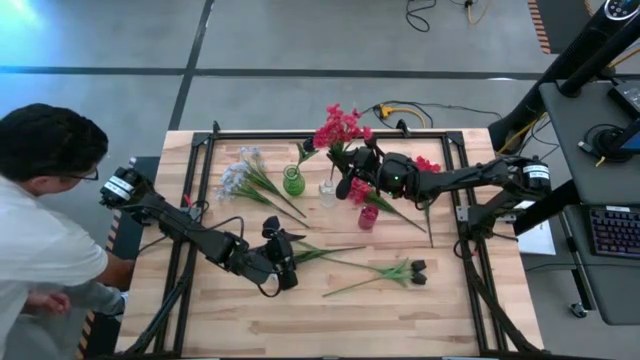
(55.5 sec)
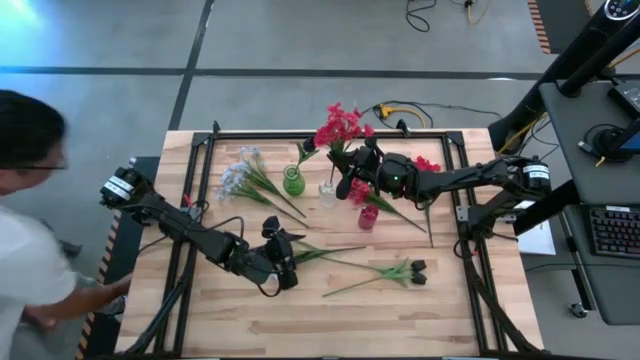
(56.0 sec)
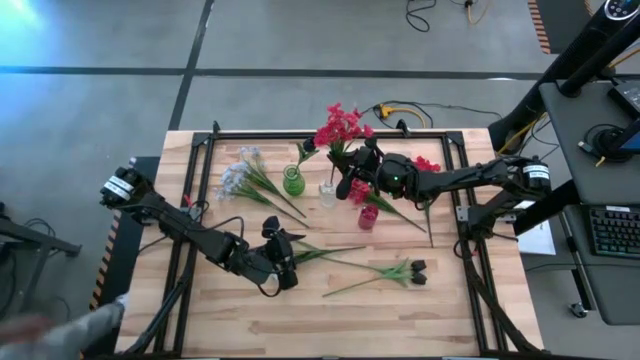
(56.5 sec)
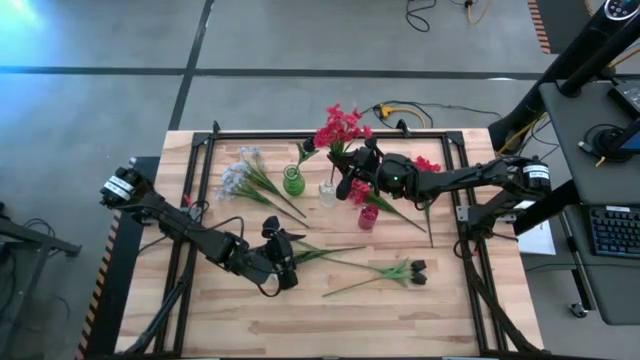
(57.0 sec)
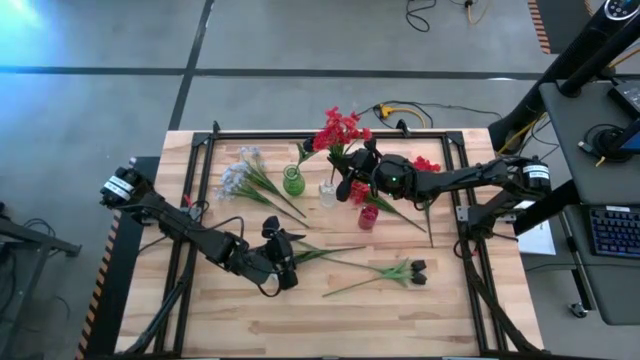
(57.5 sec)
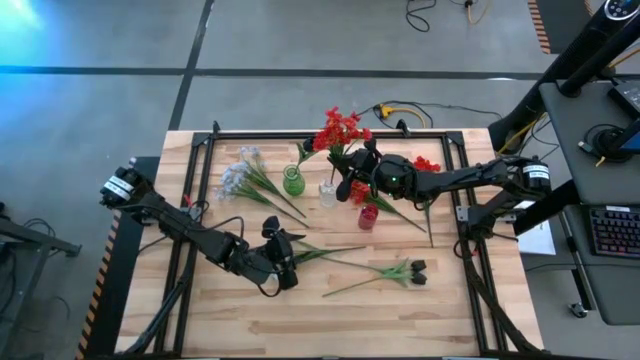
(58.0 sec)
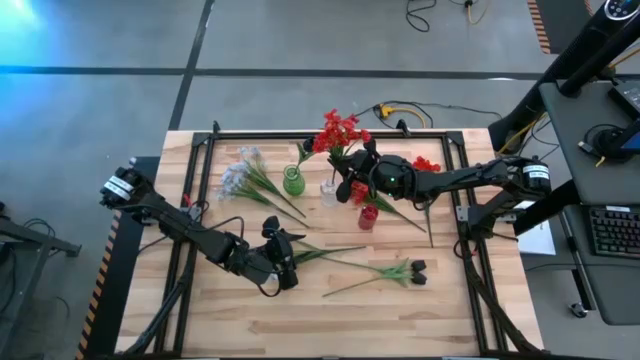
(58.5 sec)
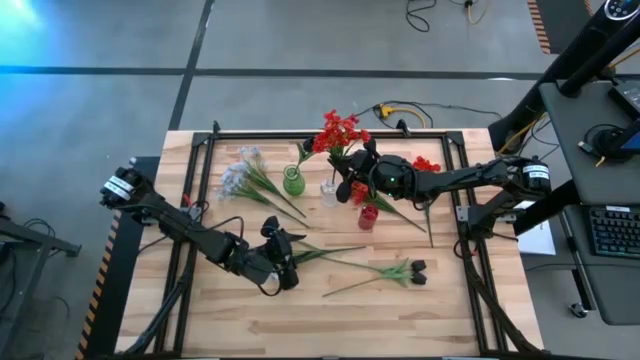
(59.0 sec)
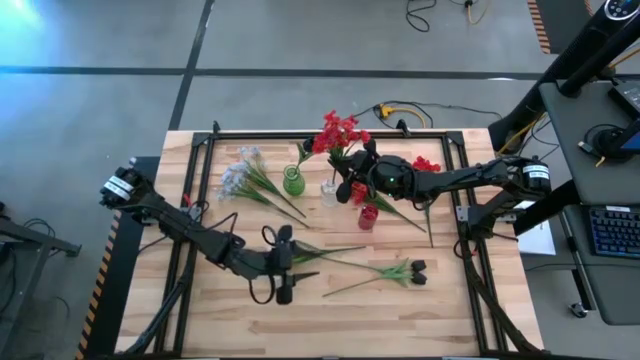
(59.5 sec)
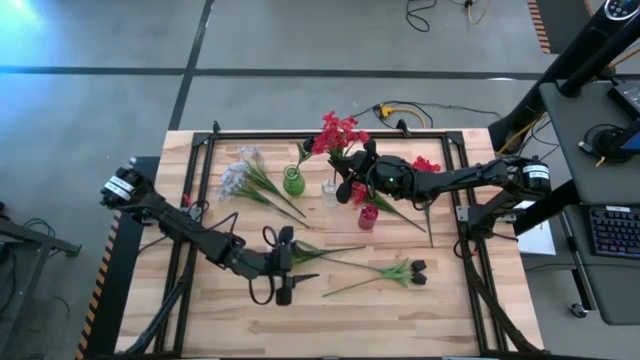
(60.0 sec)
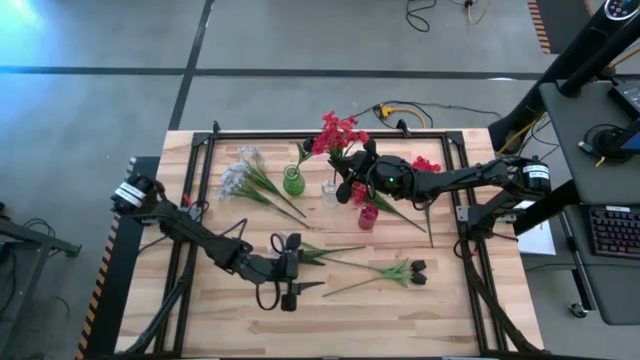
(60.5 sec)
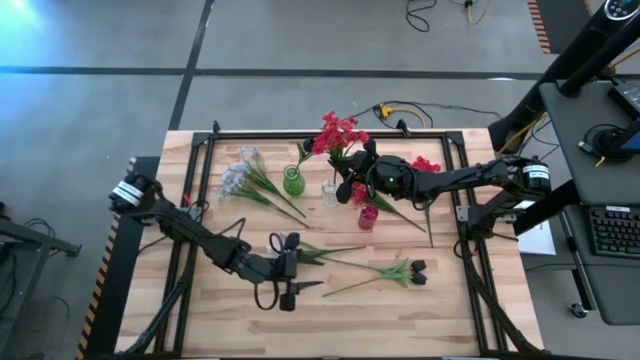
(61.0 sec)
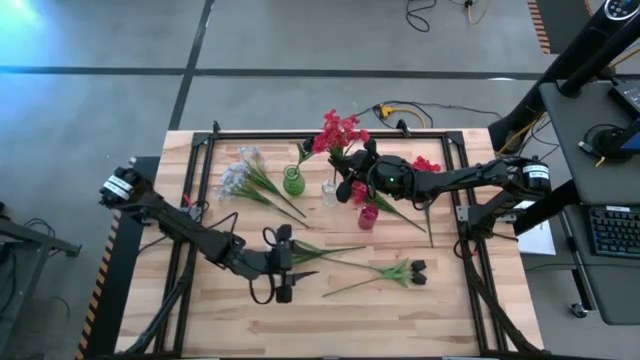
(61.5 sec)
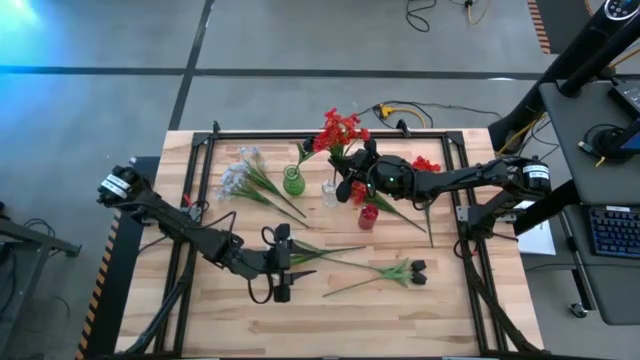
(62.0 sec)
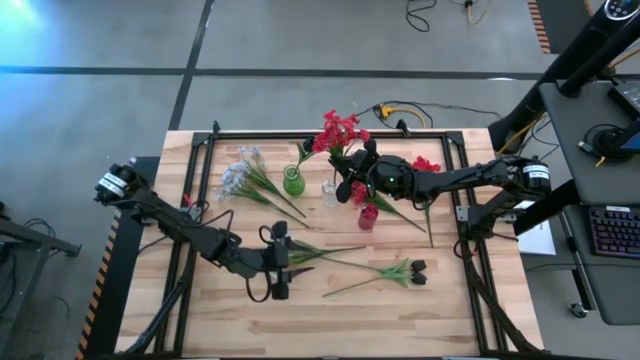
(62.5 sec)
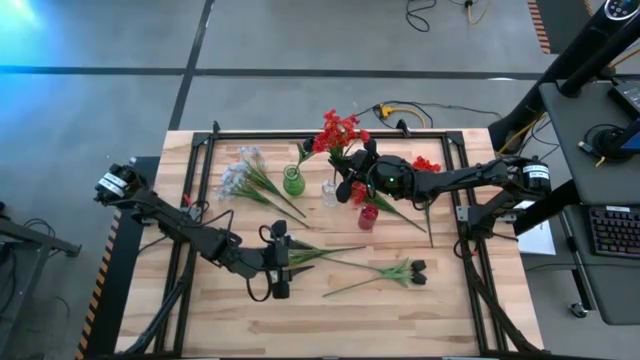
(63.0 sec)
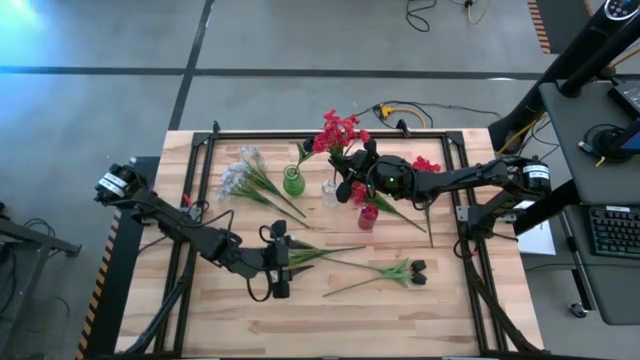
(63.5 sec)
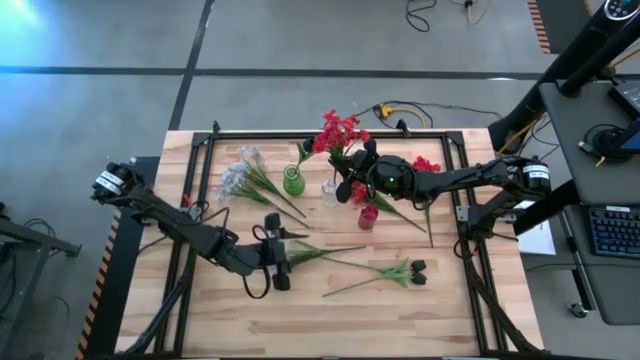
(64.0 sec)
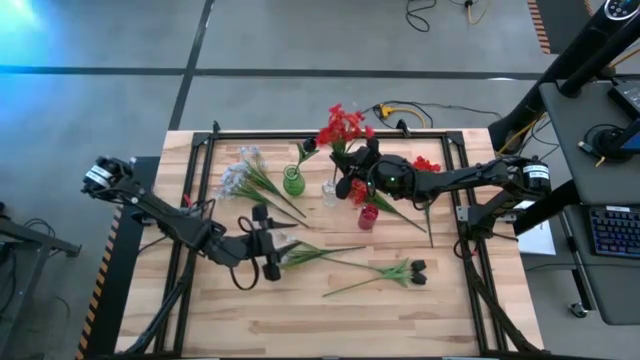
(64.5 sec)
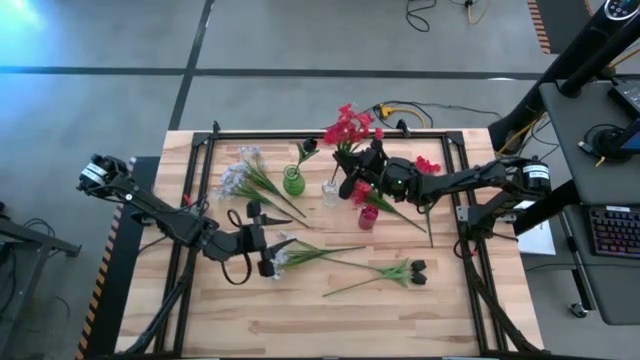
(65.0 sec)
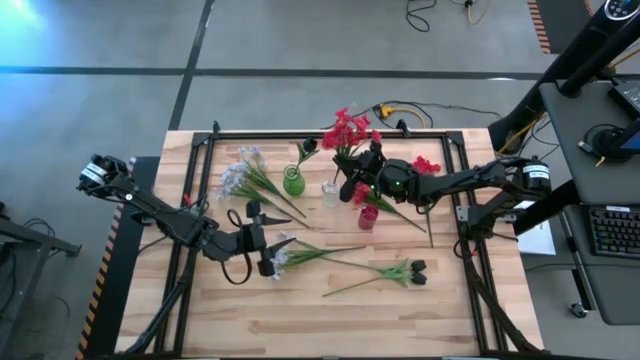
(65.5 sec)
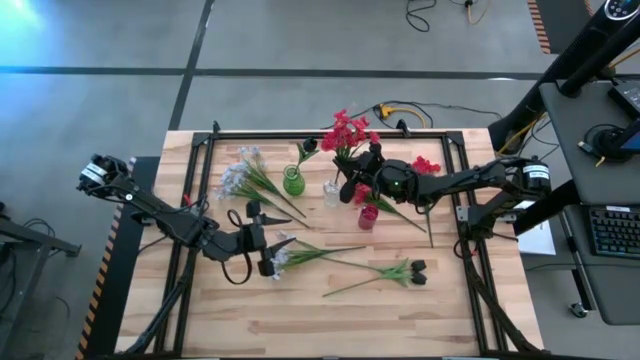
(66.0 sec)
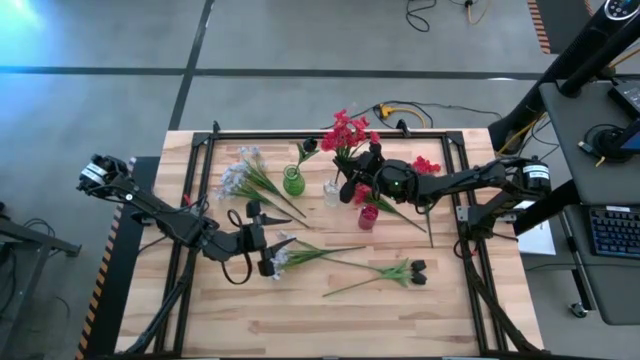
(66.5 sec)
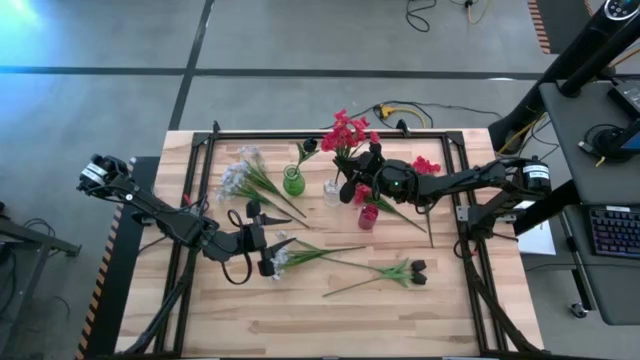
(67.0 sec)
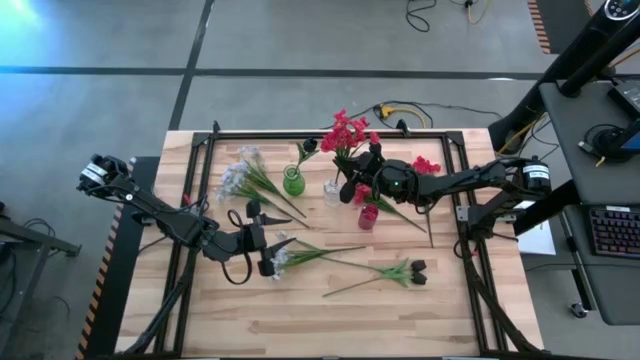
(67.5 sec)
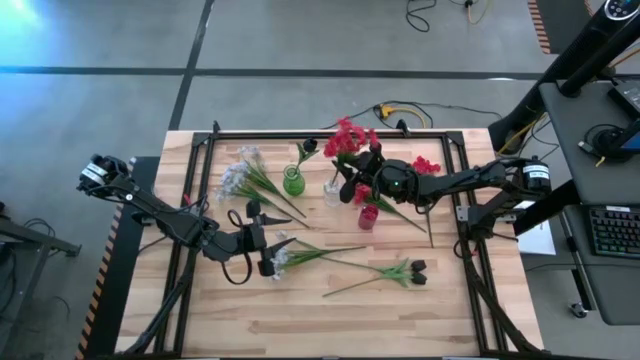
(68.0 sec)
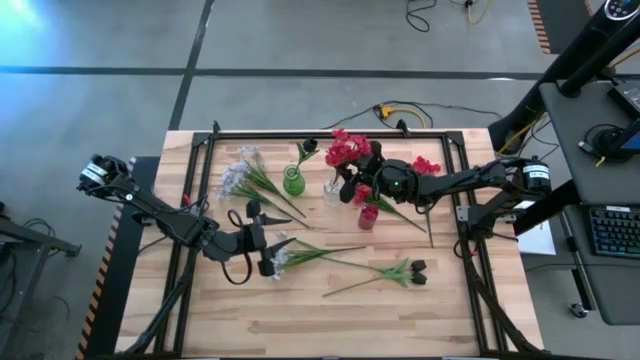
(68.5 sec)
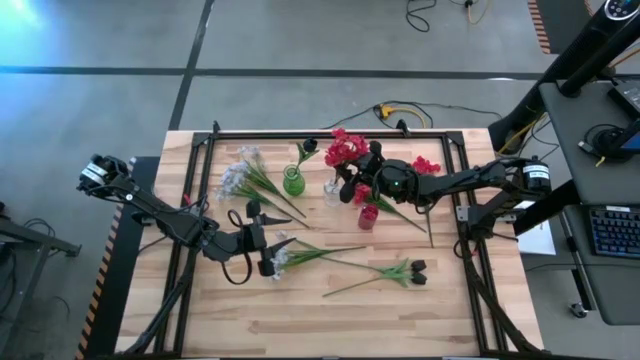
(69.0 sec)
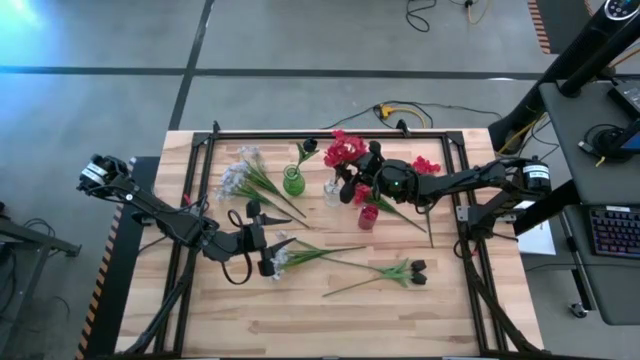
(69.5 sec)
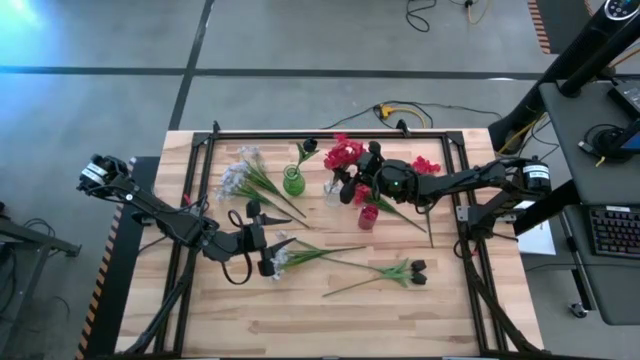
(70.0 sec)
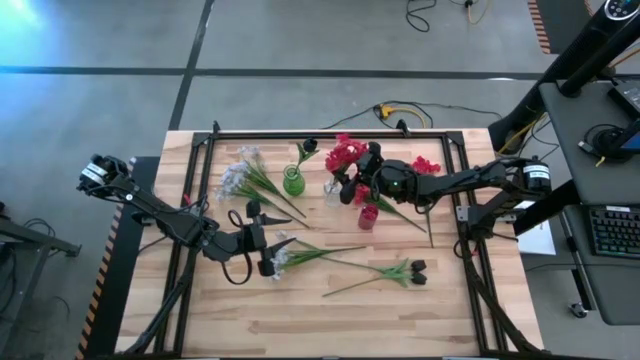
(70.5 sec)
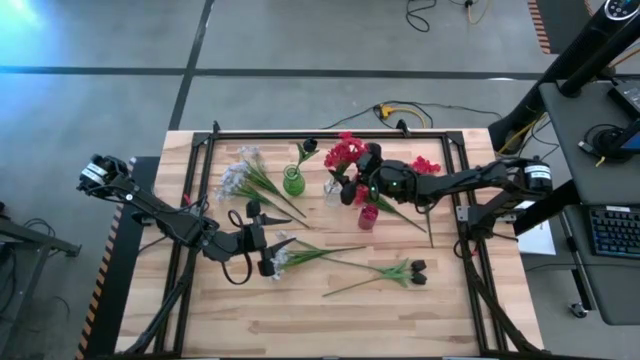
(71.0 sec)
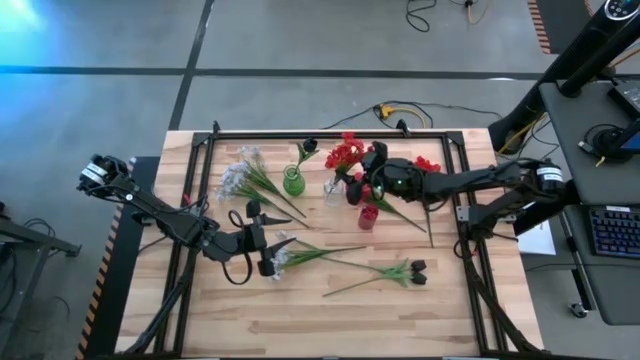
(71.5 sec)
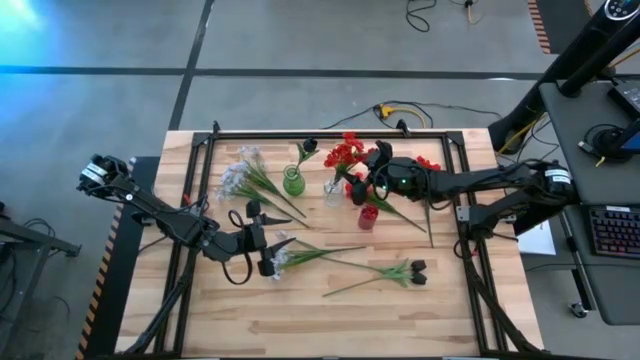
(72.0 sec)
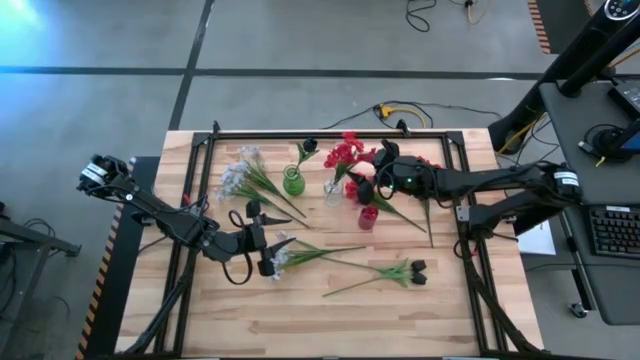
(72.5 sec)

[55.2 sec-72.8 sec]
Task: Sort flowers into vase by color
Put the bottom left orange flowers into the transparent vase

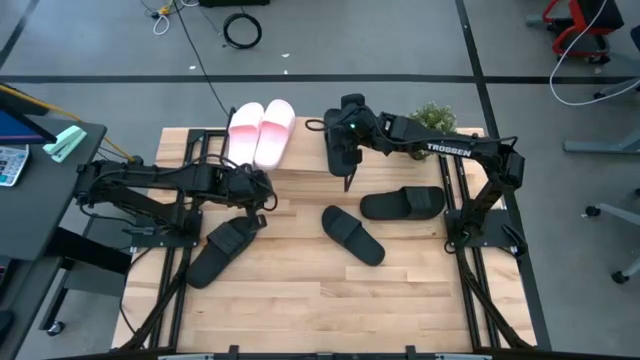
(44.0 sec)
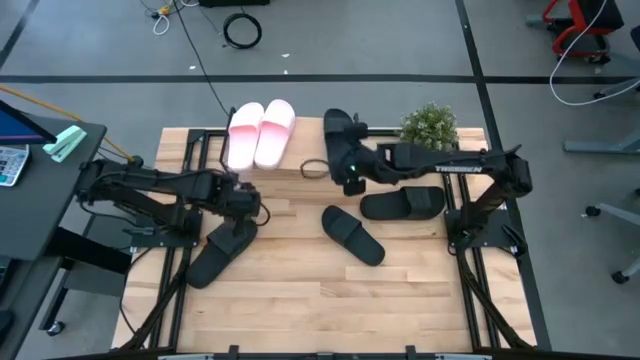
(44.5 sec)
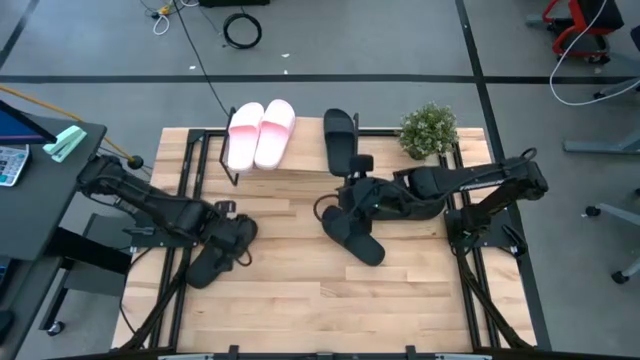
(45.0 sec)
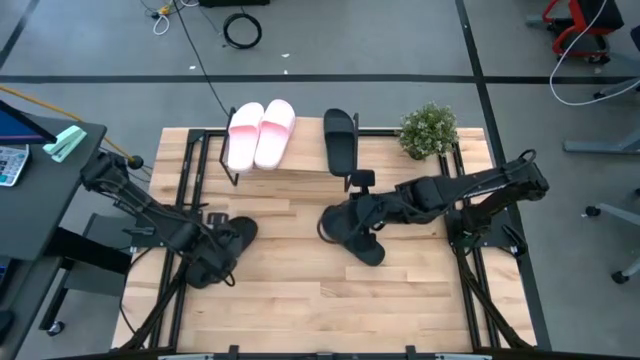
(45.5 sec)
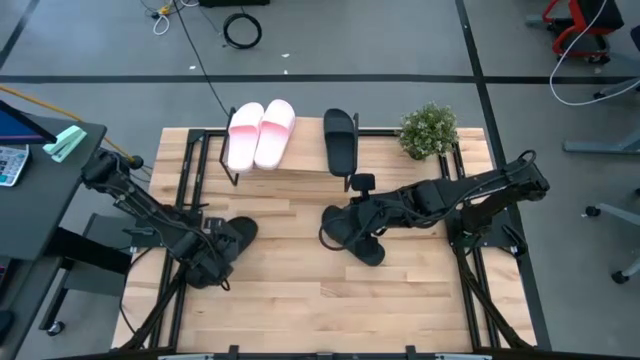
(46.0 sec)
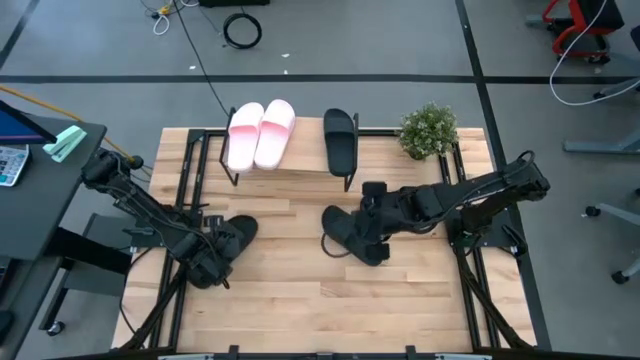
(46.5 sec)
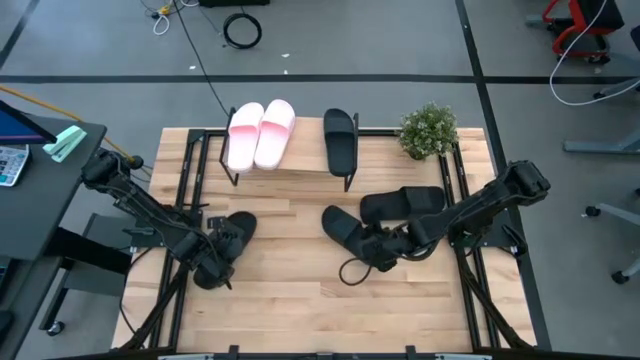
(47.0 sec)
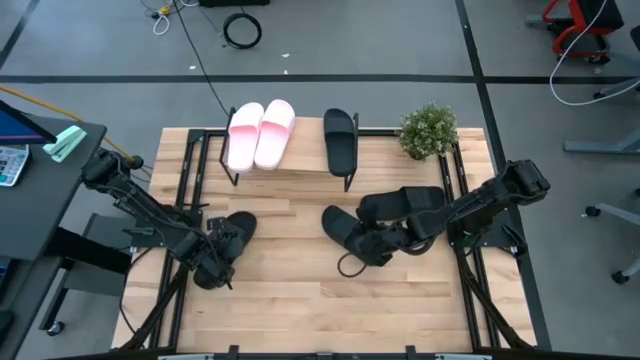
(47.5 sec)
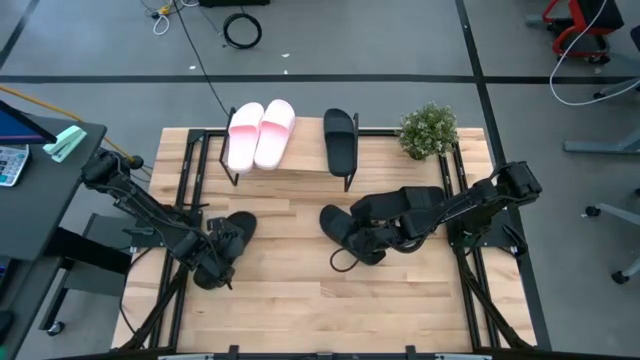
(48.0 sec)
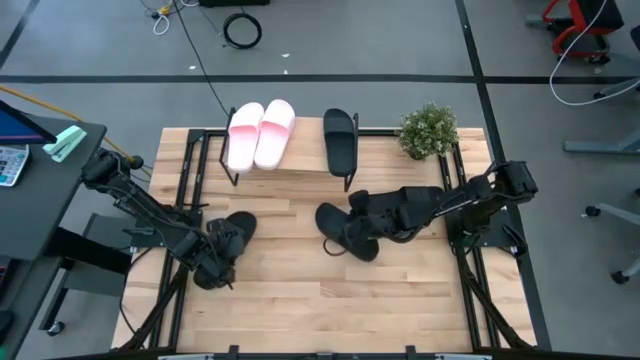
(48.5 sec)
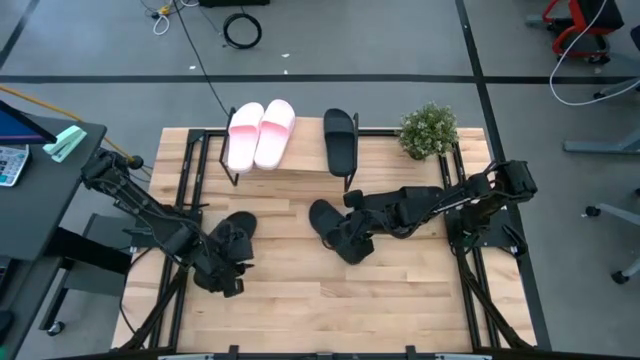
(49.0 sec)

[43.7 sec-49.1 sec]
Task: Pick and place slides into the shelf
Put the black slide on the shelf
